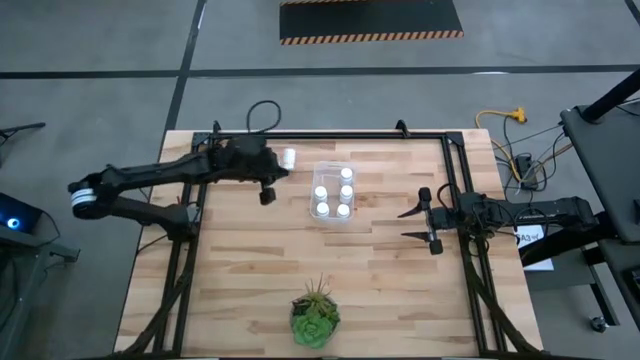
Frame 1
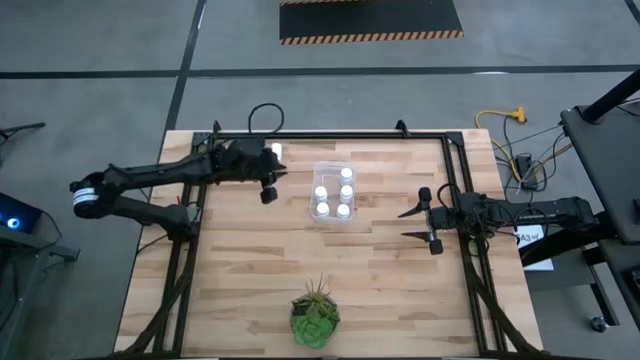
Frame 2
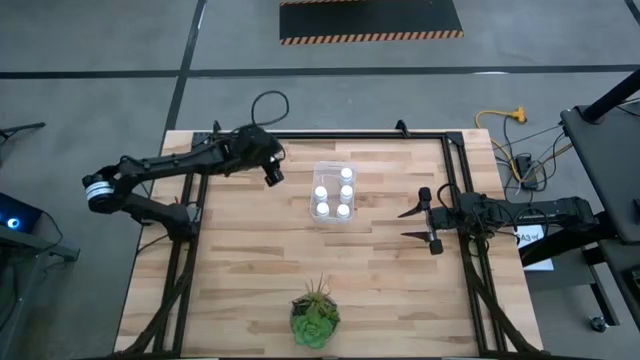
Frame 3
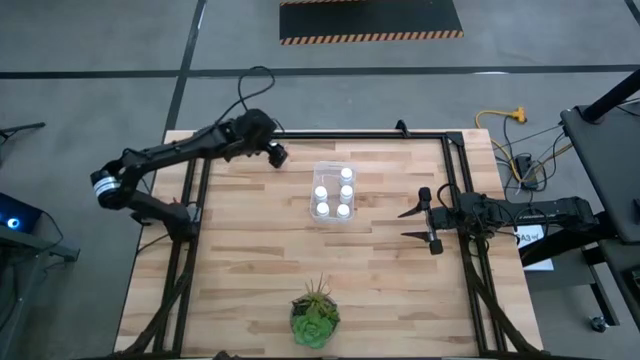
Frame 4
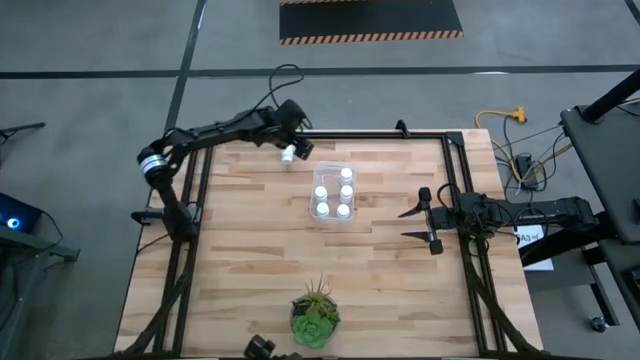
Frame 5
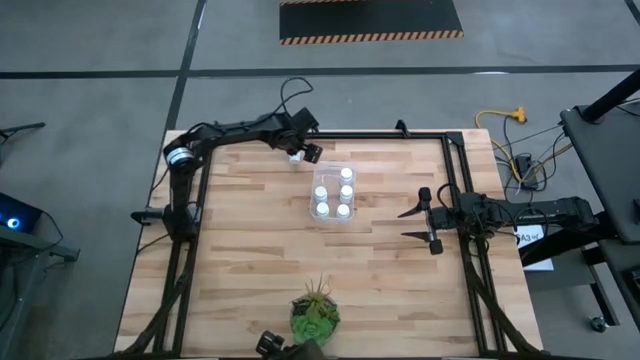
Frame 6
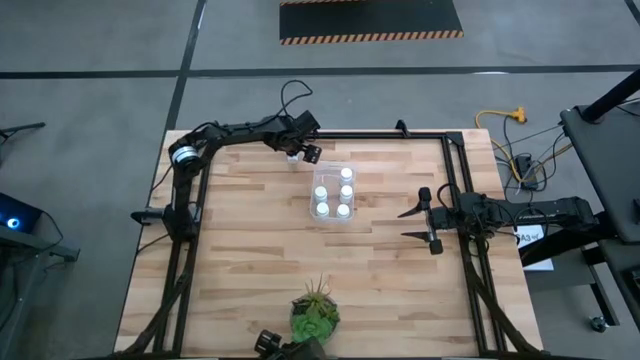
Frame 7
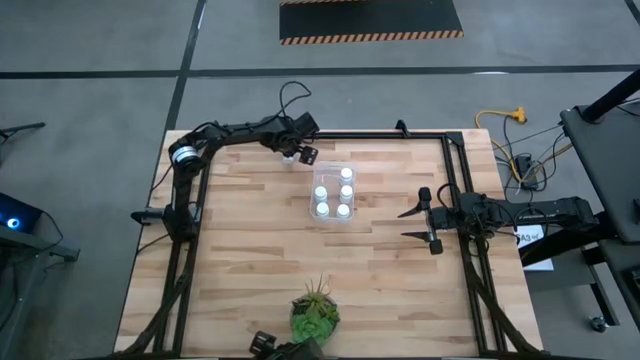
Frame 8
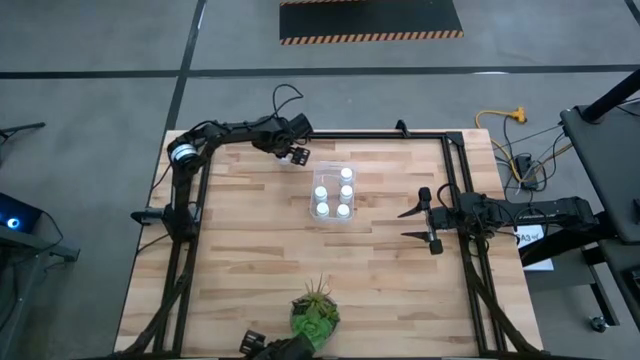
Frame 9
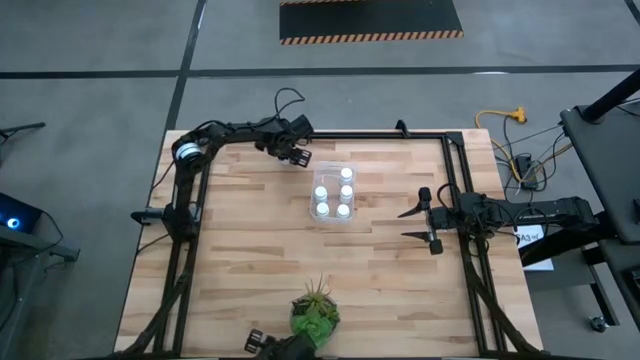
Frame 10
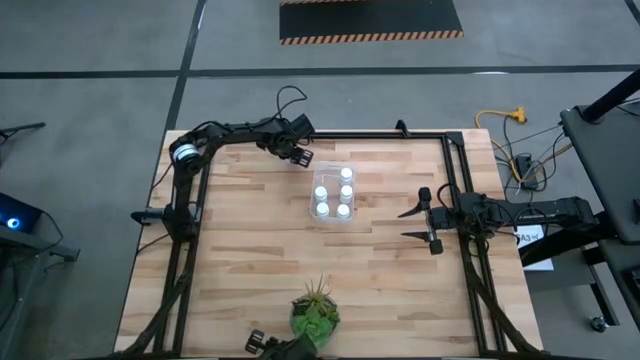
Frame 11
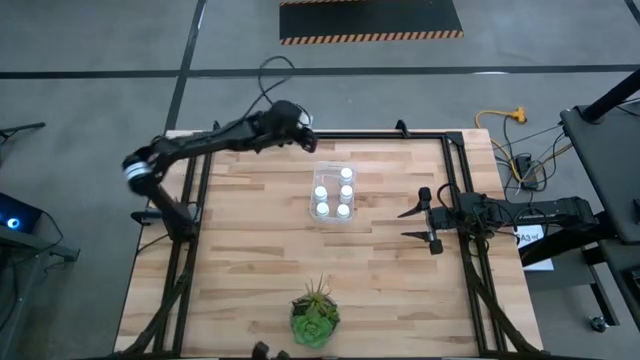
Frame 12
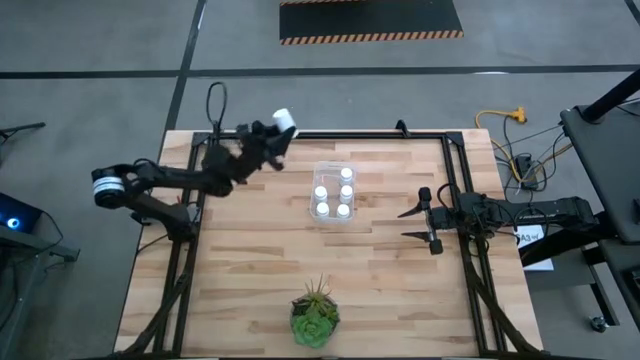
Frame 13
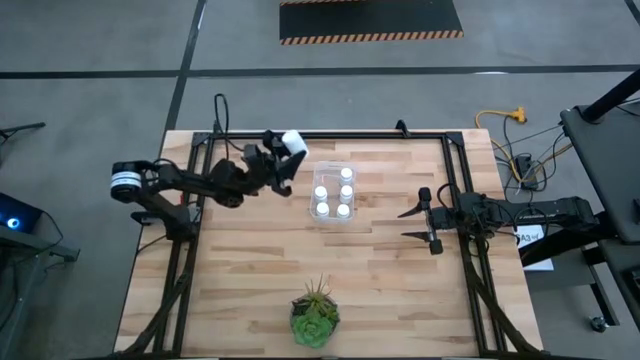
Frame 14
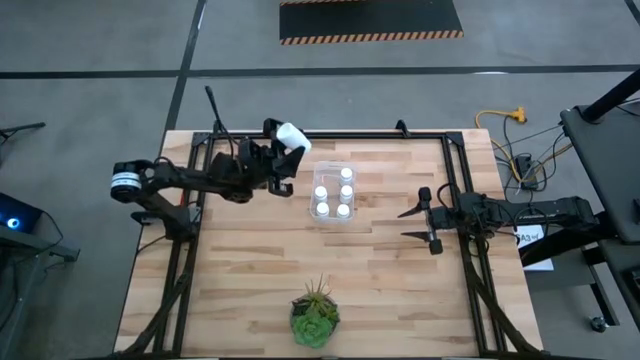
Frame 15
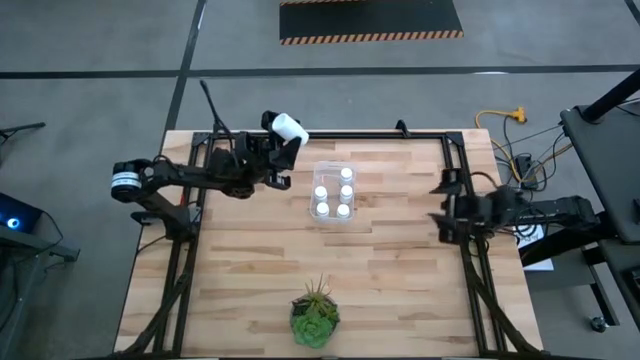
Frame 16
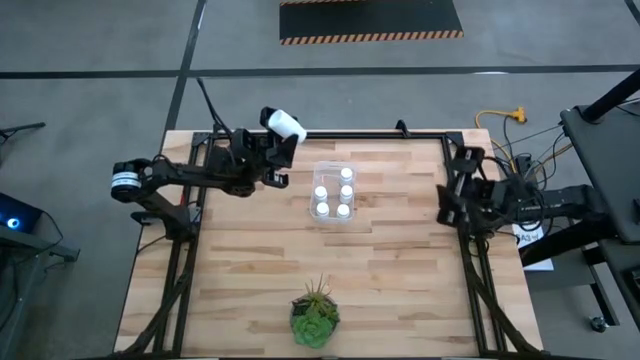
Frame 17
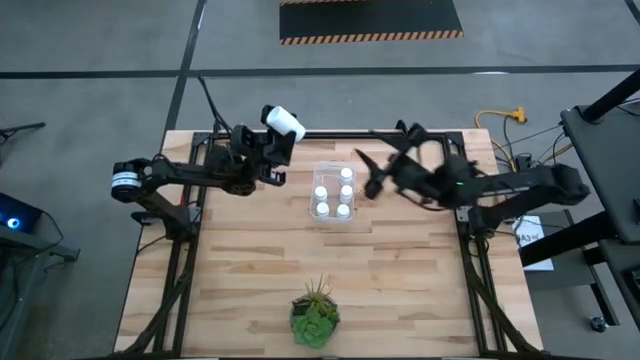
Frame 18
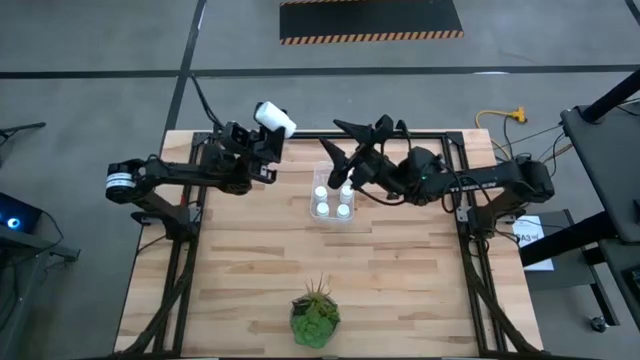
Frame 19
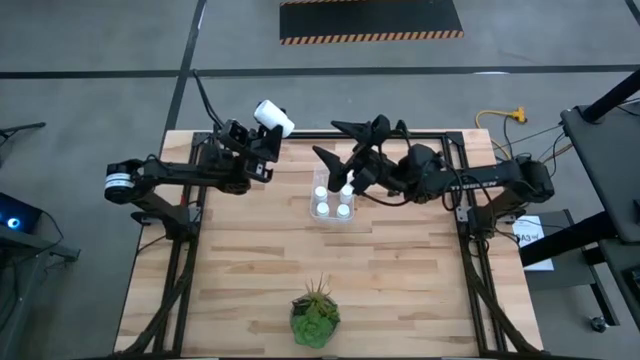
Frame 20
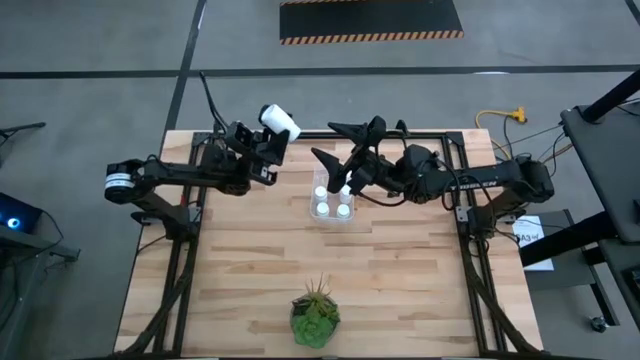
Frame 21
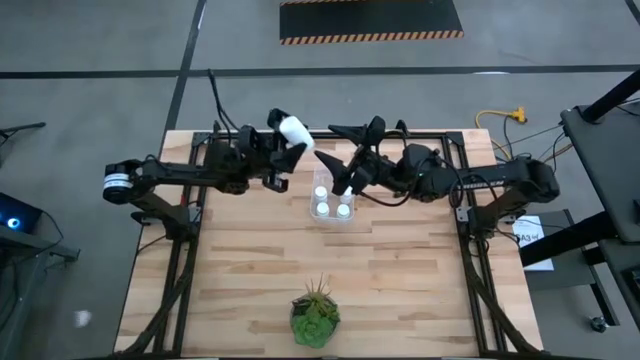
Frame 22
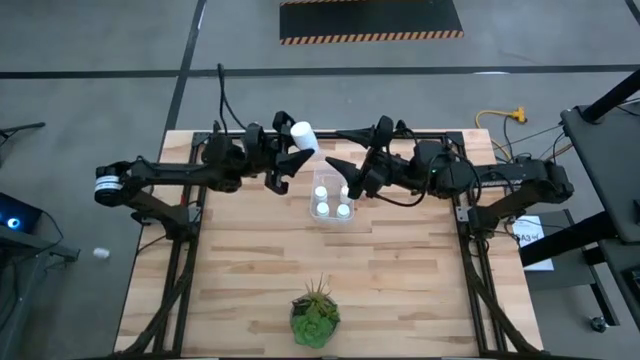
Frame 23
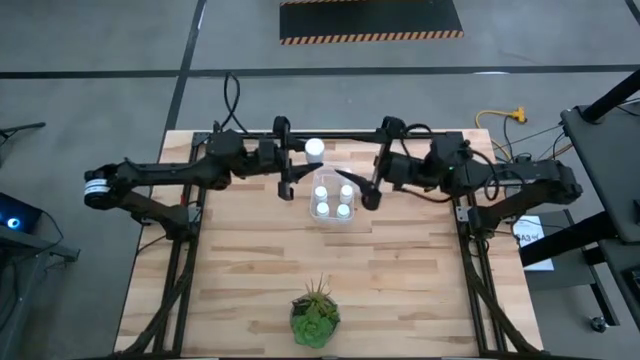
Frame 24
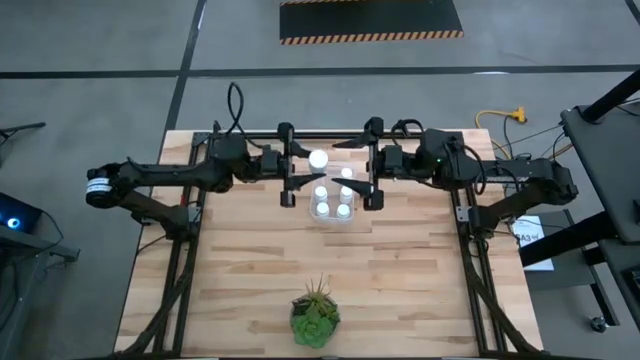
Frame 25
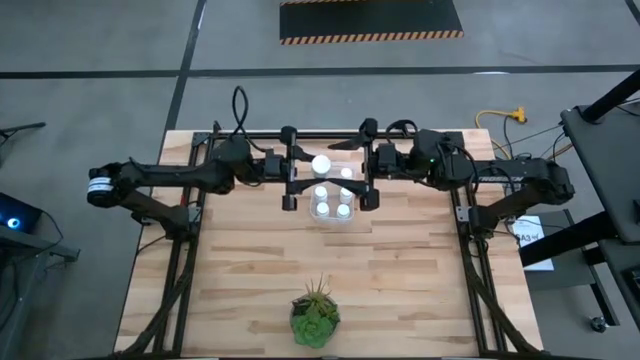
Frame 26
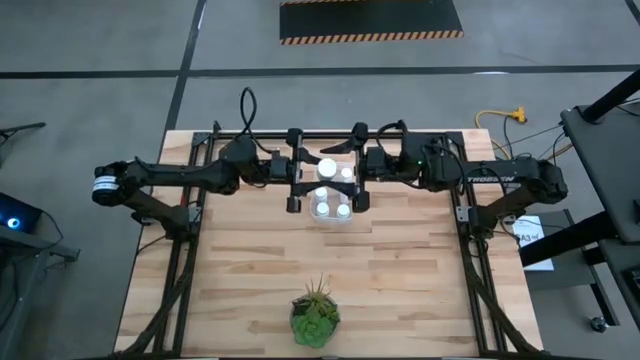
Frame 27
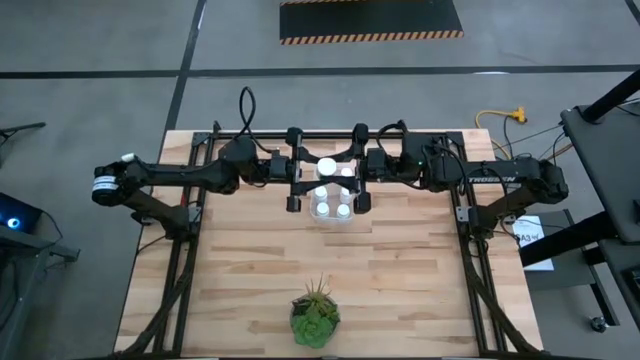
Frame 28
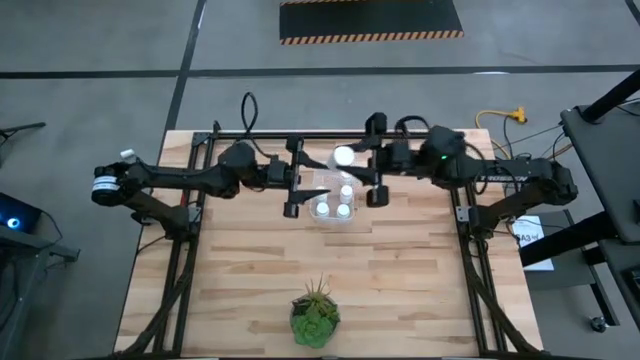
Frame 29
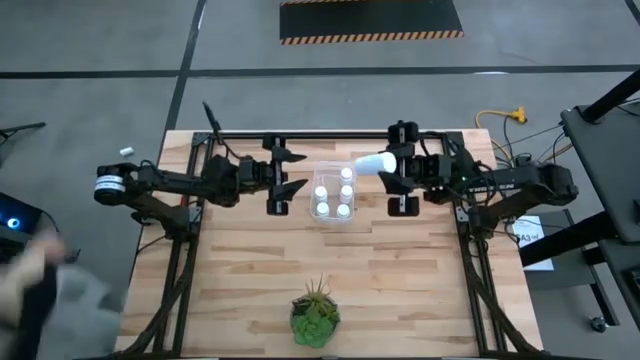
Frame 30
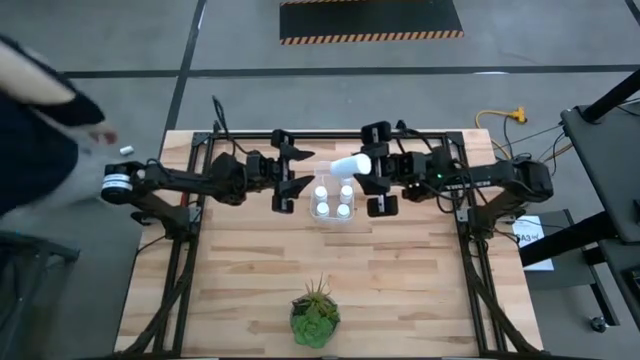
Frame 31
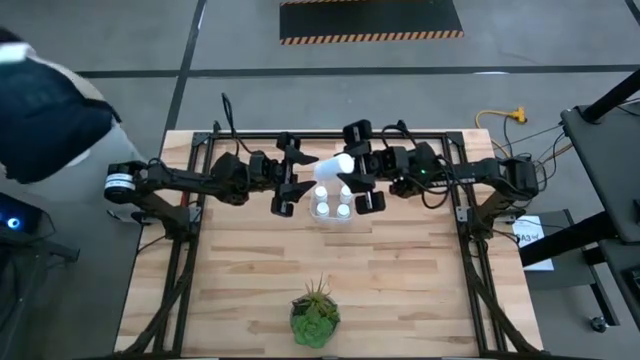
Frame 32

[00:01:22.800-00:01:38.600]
Task: Pick and place pill bottles into a basket
Put the white pill bottle into the transparent bin
